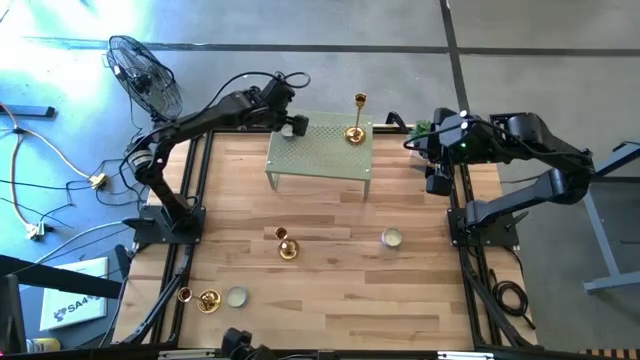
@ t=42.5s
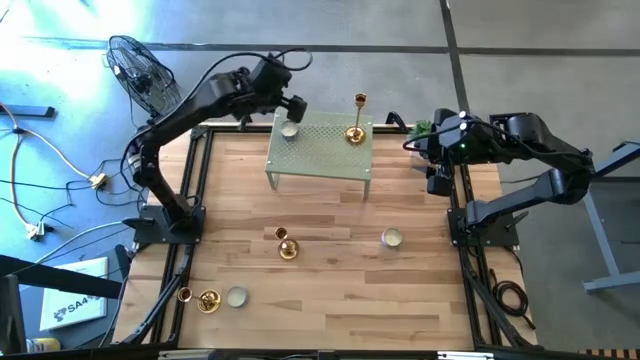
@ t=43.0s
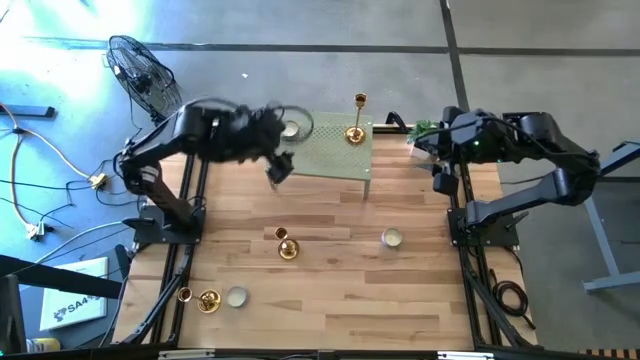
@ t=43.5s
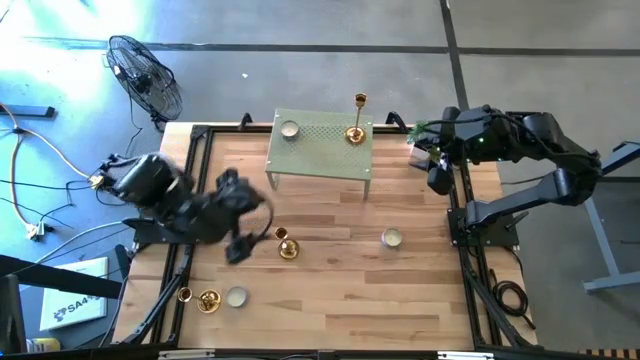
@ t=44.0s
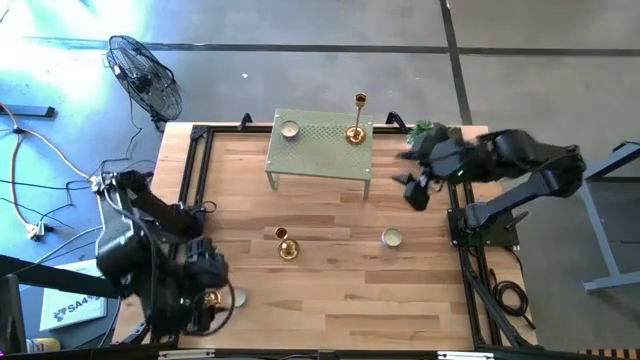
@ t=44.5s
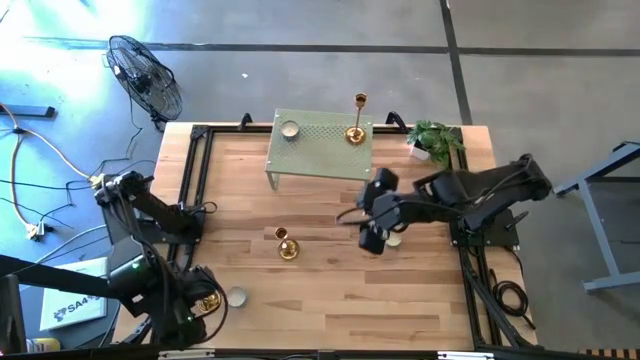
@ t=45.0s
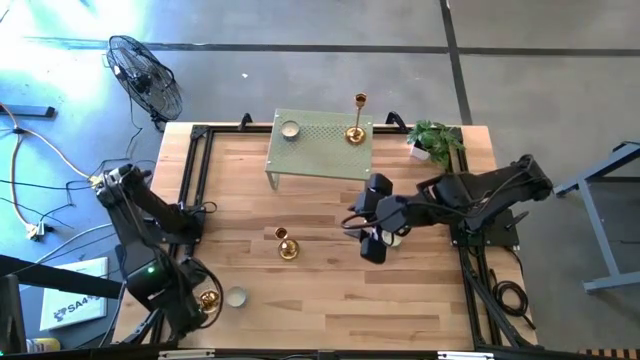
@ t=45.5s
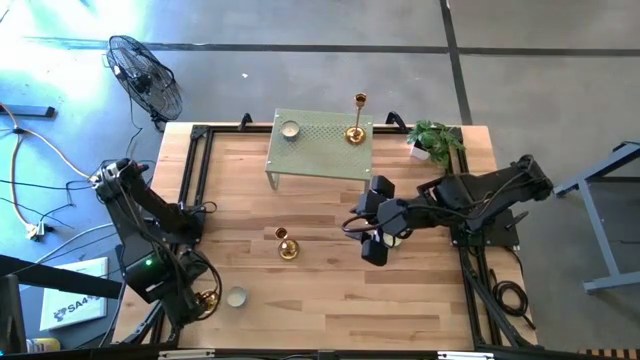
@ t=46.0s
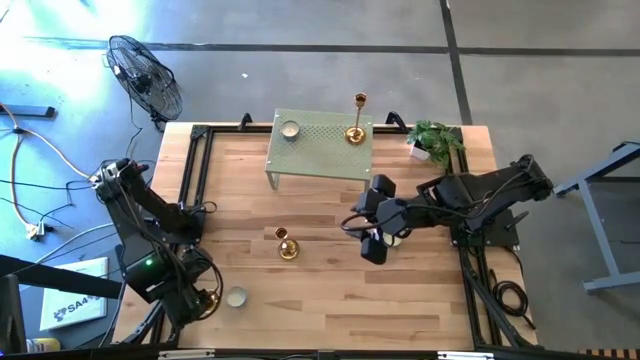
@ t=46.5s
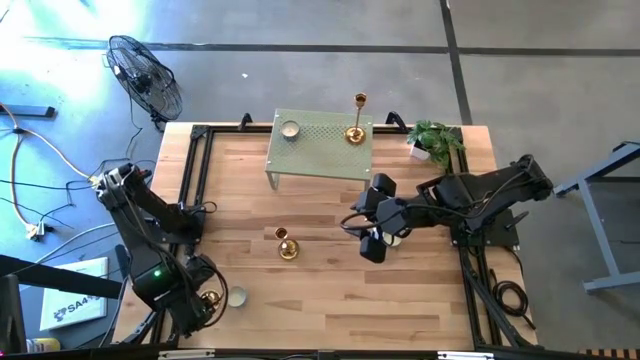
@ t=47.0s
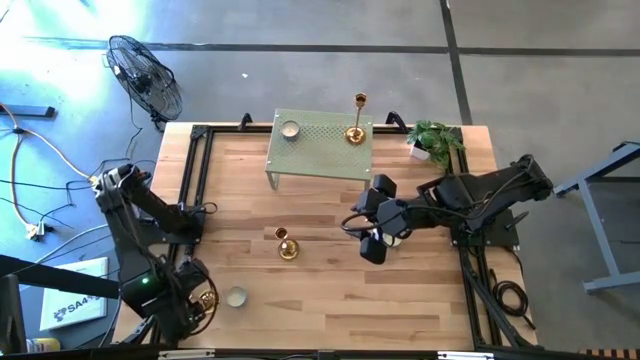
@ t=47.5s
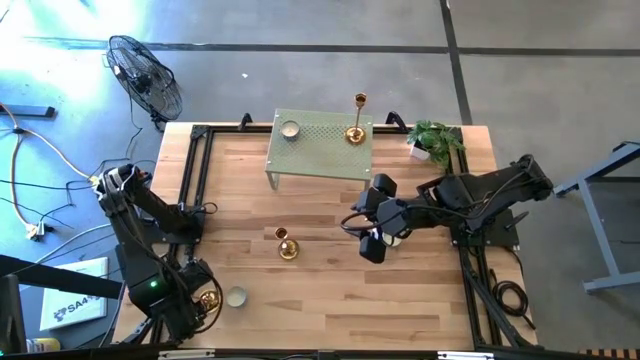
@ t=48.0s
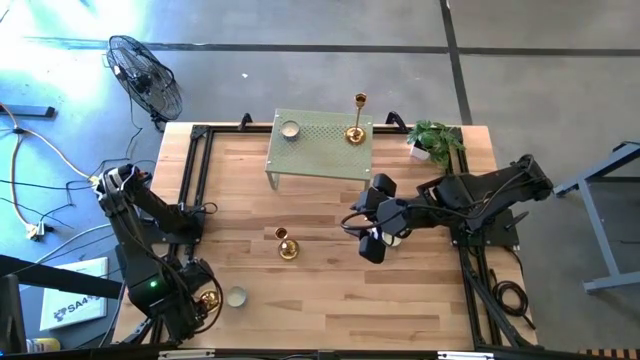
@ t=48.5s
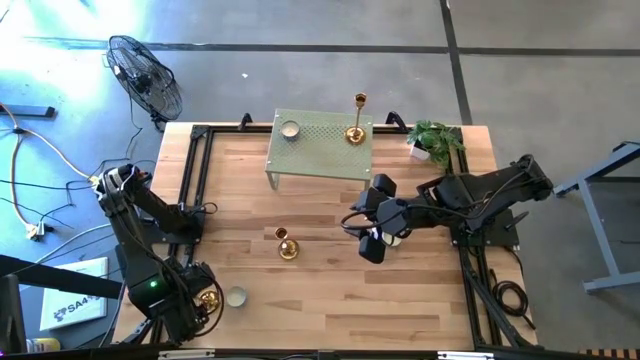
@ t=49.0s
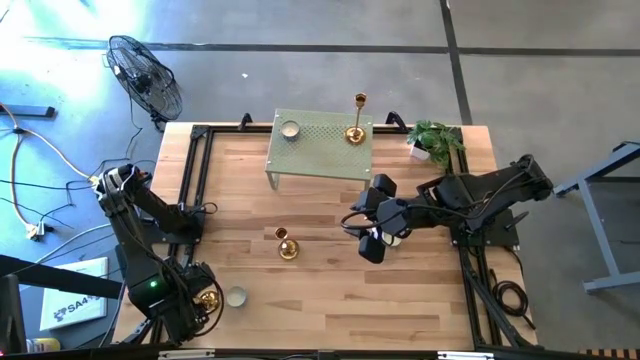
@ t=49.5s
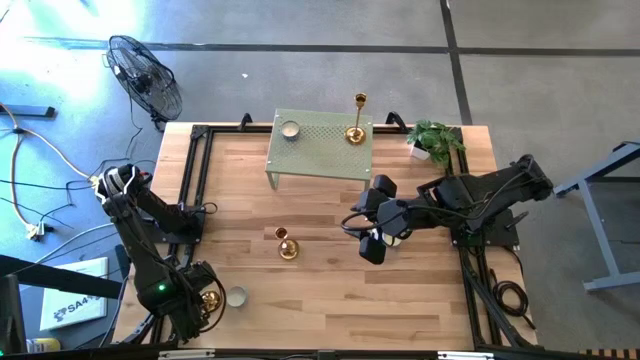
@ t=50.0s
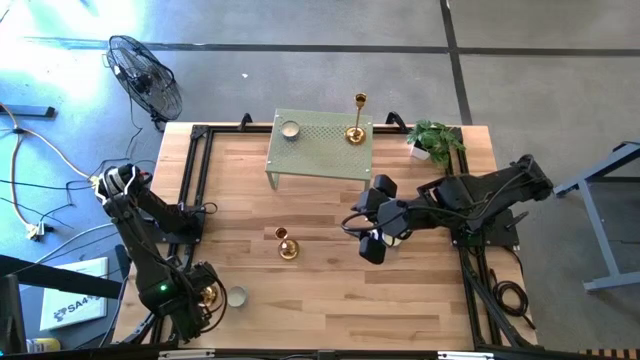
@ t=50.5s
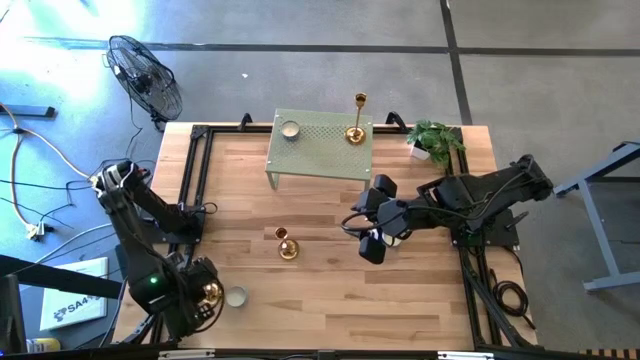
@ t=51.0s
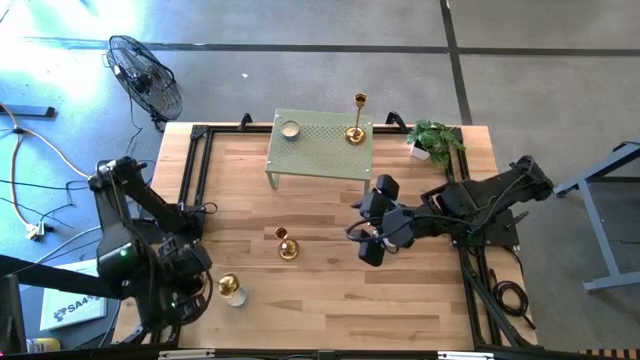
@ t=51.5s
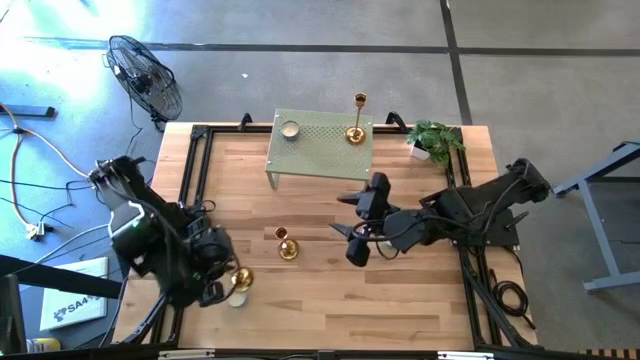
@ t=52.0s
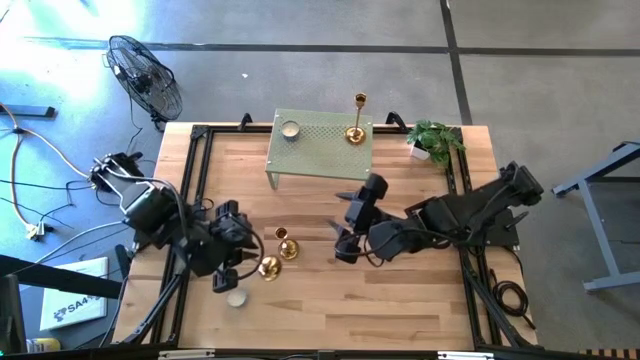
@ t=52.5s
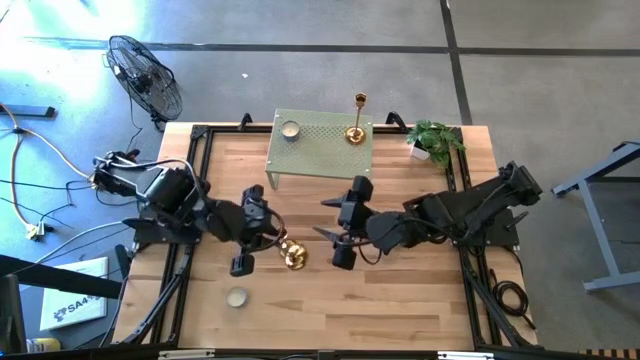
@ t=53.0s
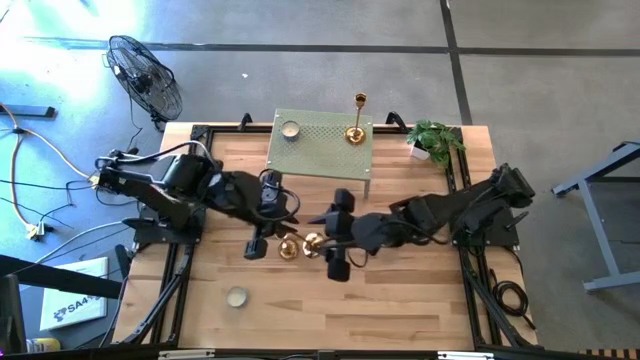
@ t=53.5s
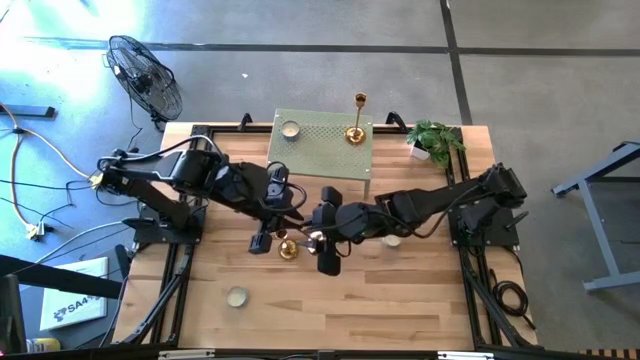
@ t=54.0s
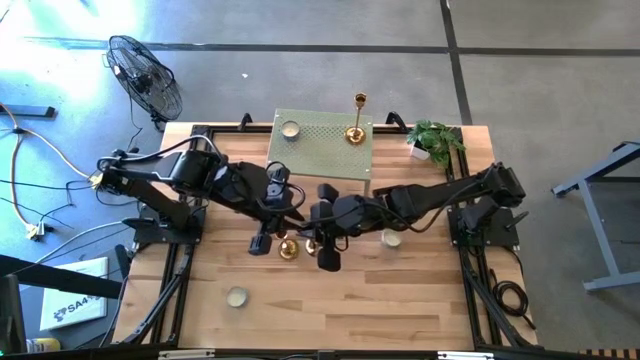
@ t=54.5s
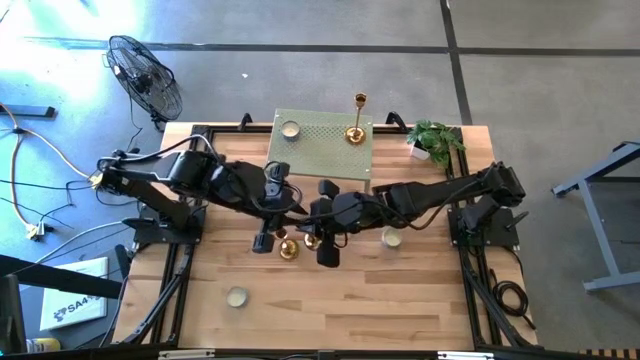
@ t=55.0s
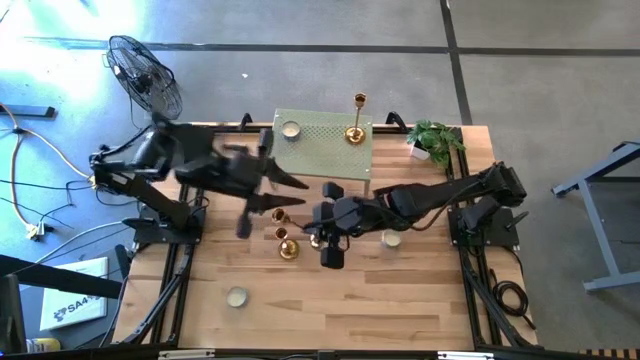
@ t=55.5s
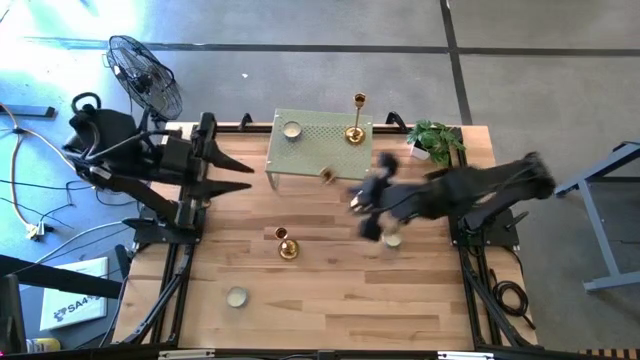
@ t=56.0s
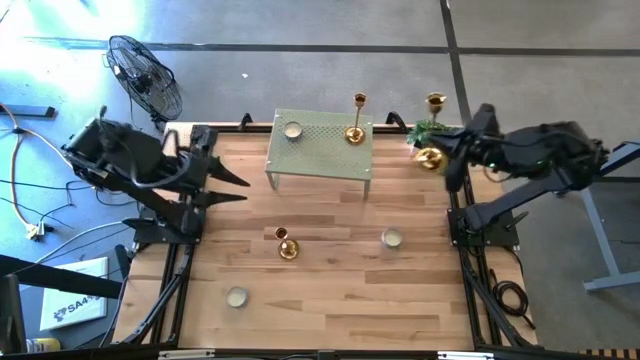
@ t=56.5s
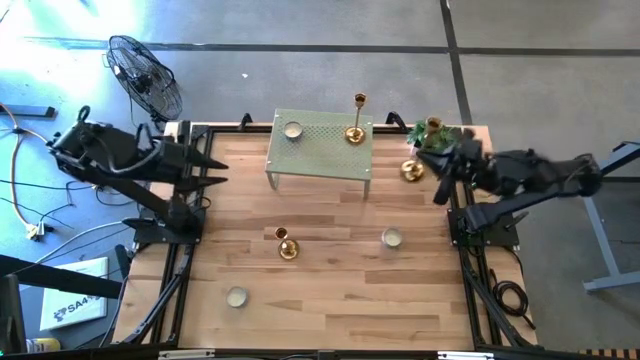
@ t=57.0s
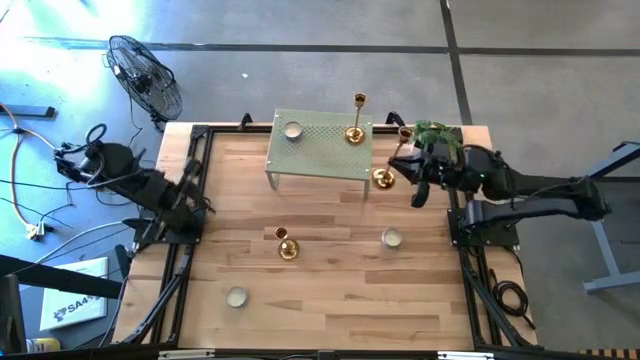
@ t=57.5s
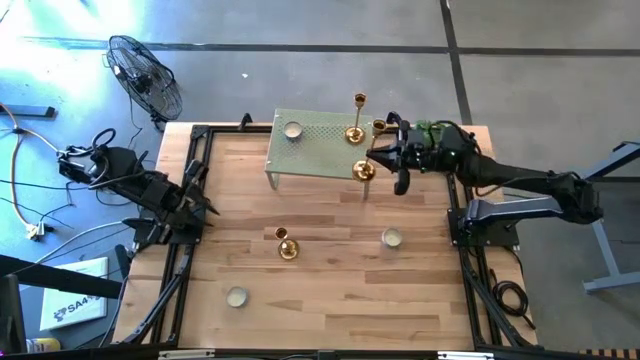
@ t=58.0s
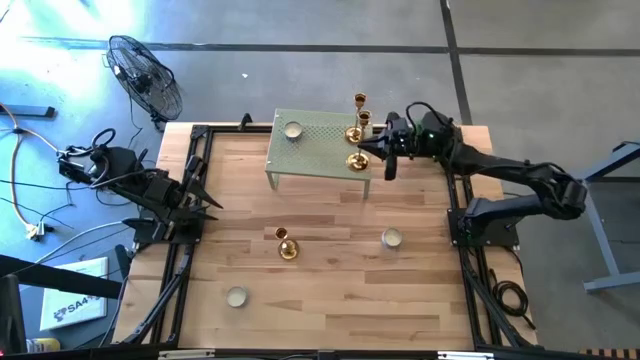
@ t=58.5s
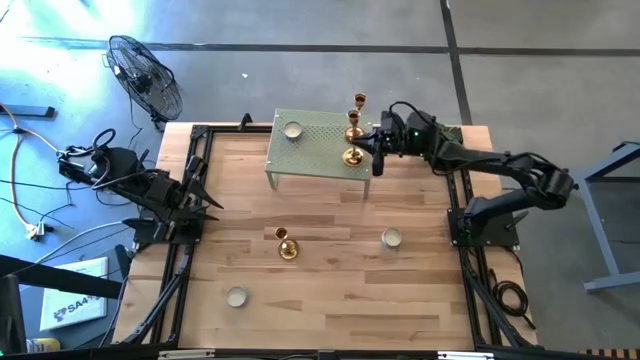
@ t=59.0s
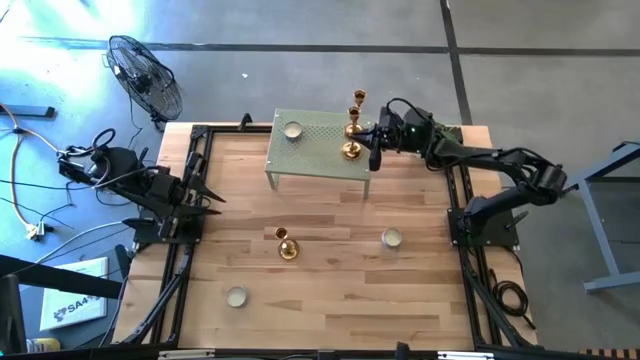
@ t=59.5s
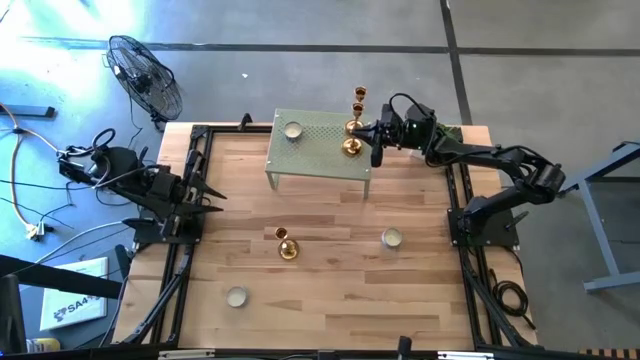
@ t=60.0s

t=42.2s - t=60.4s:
Task: Stock candles and holders on shelf
Align the bottom gold candle holder with the other gold candle holder on the shelf

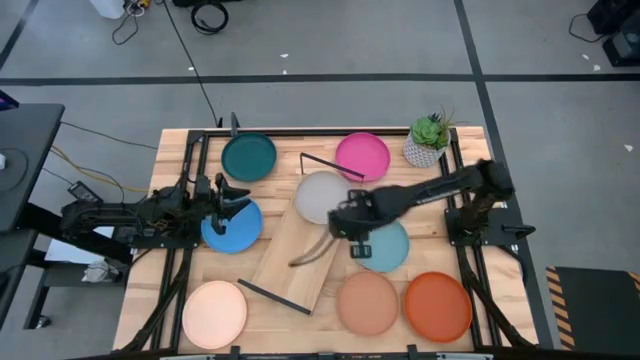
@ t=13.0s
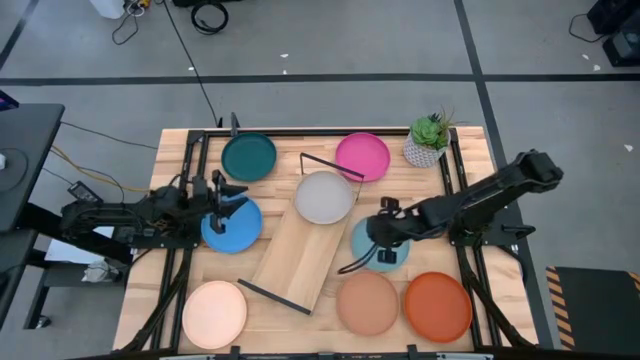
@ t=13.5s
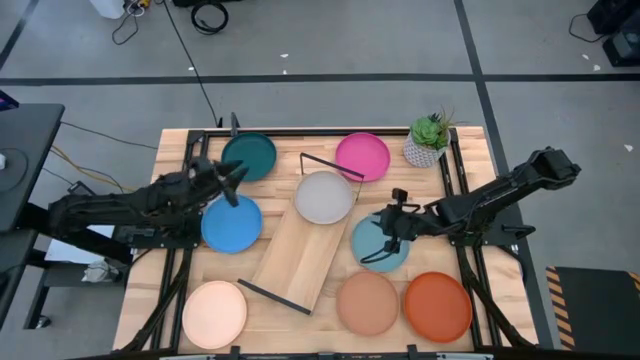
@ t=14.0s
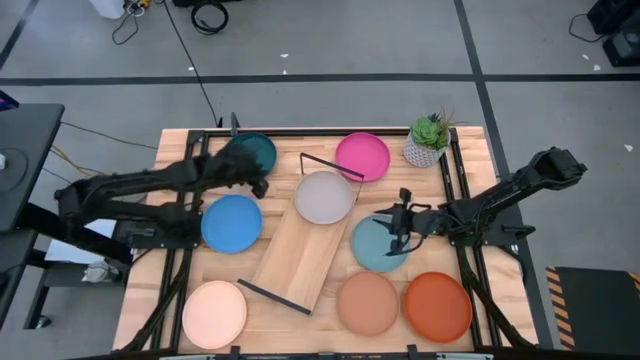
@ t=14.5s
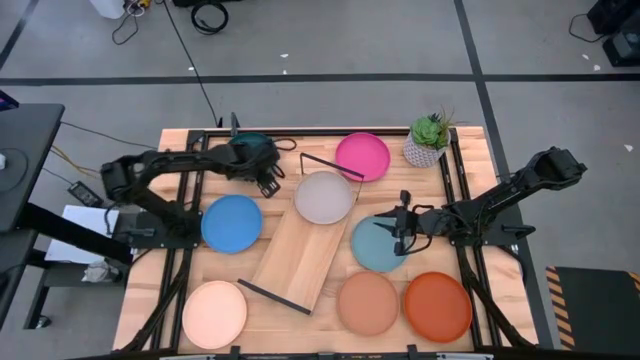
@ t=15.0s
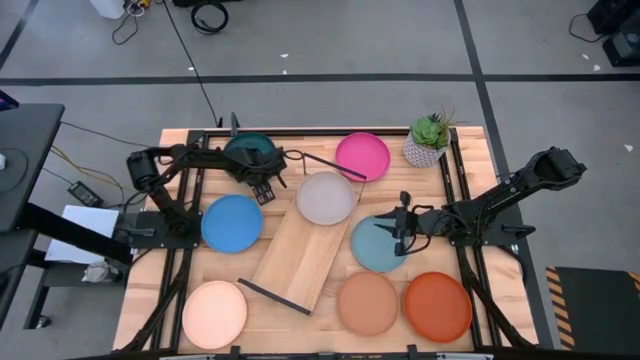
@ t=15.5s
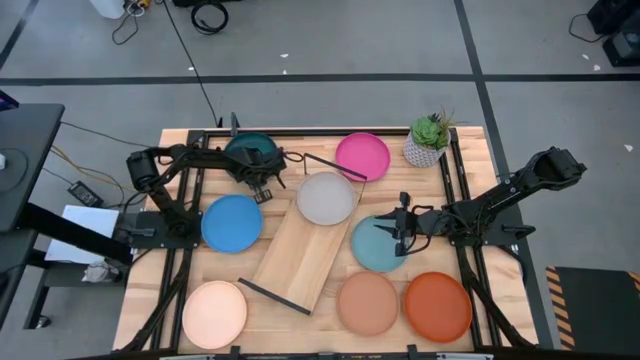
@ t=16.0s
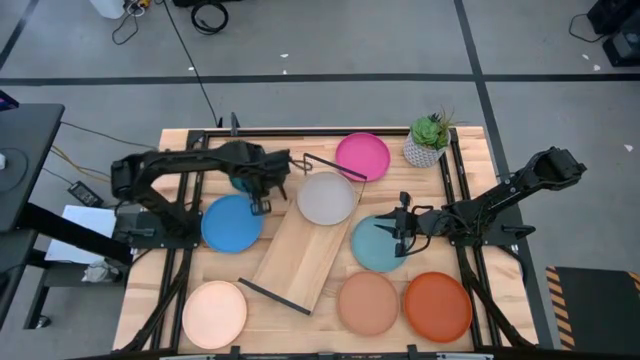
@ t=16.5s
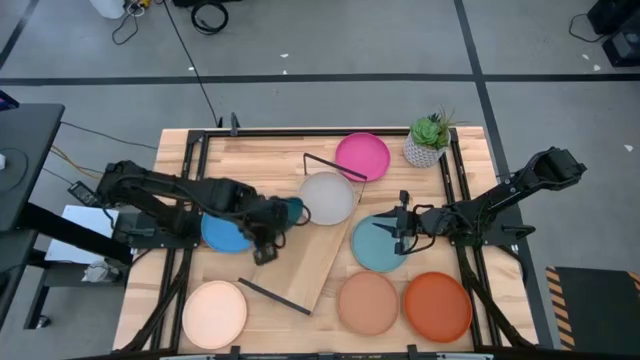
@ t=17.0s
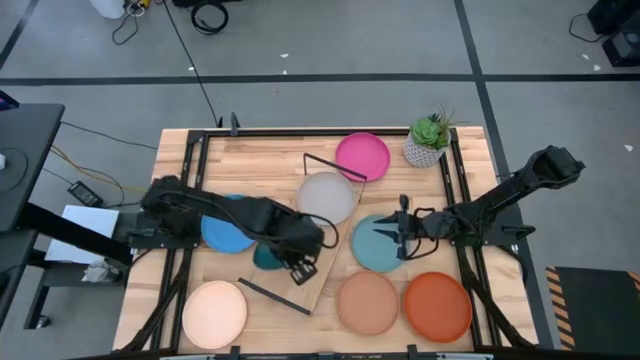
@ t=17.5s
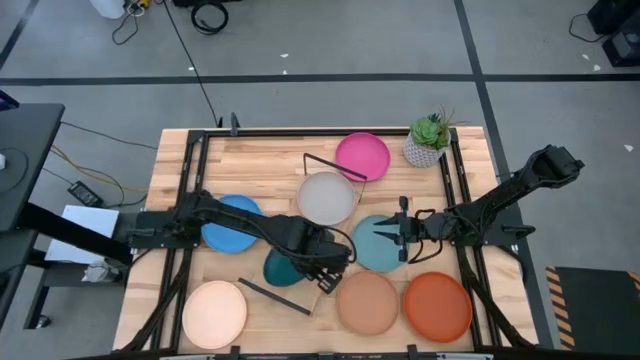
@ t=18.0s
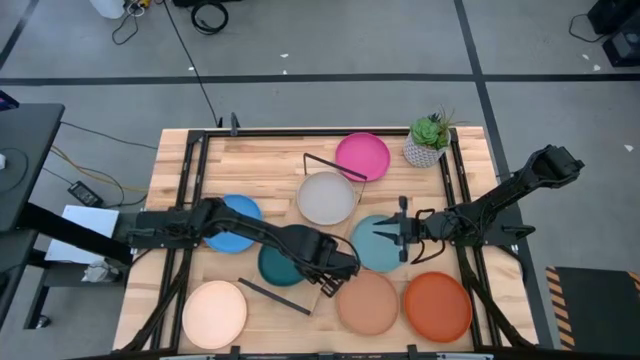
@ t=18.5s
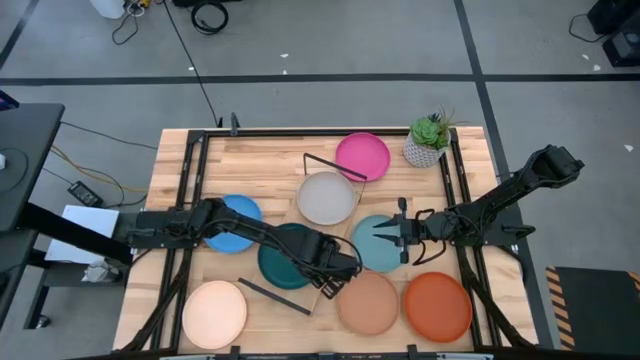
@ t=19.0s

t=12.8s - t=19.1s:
Task: Place and stack plates onto a shelf
Put the dark green plate on the shelf
